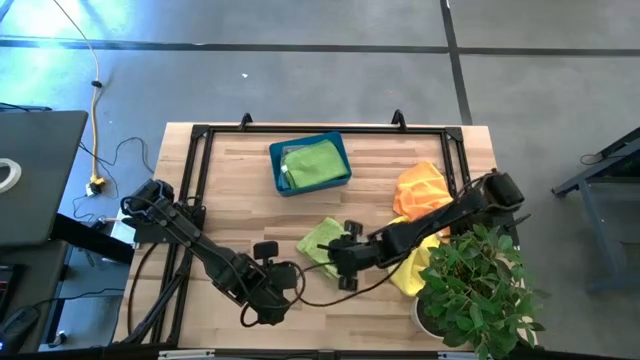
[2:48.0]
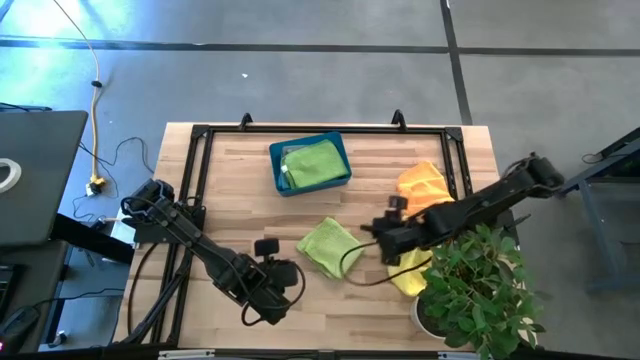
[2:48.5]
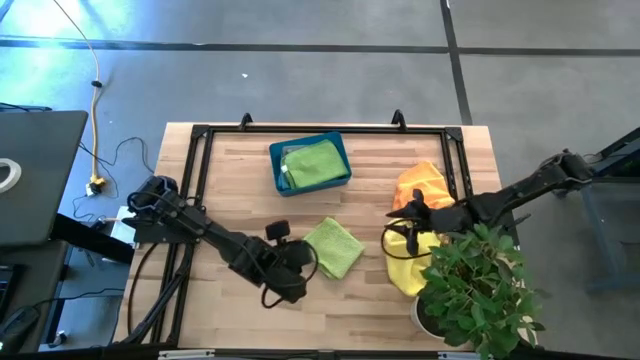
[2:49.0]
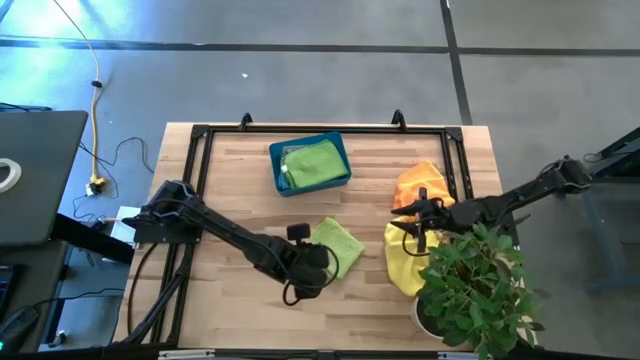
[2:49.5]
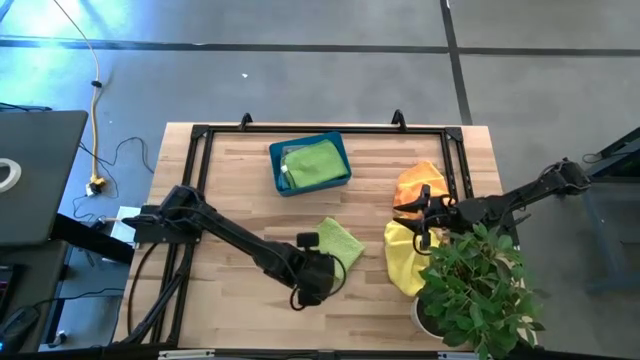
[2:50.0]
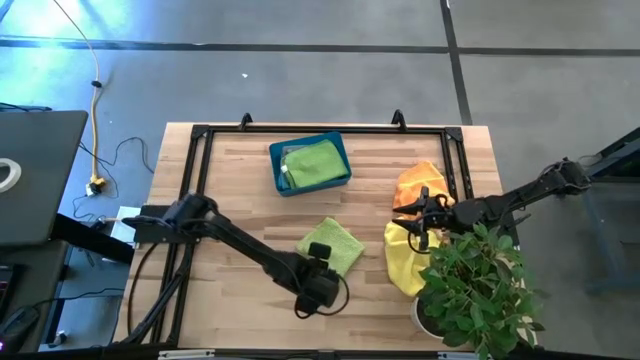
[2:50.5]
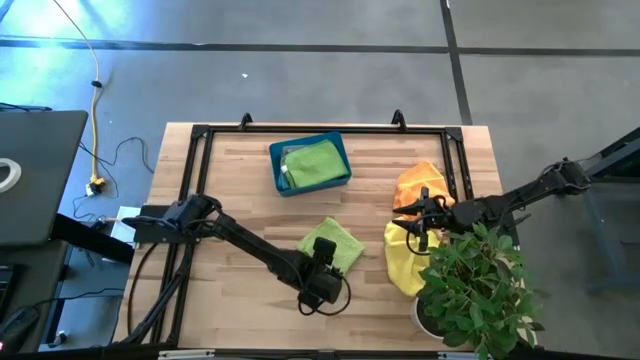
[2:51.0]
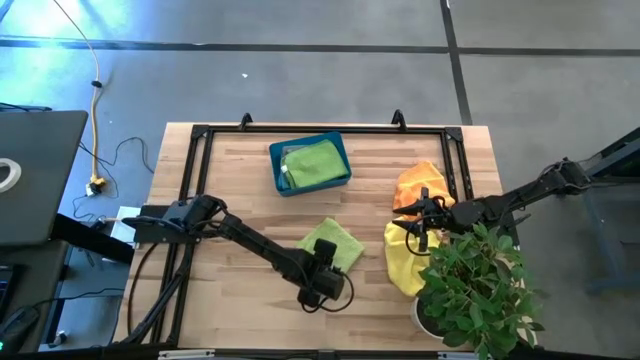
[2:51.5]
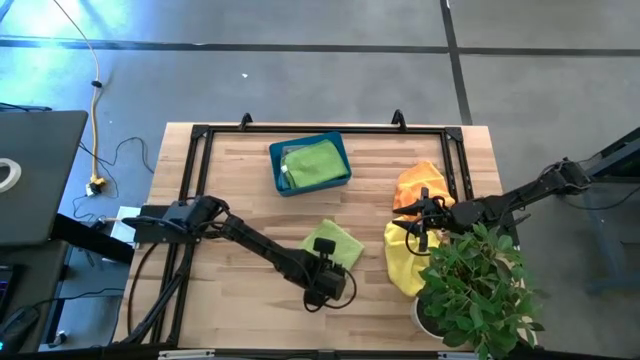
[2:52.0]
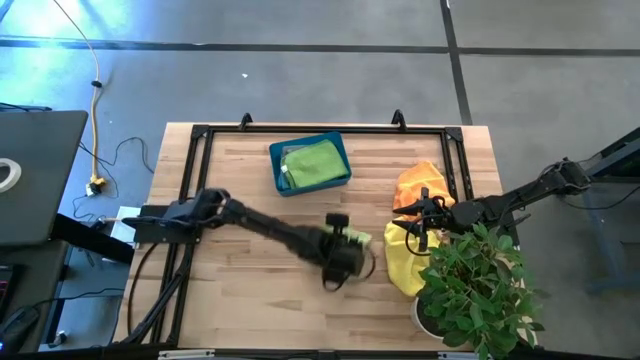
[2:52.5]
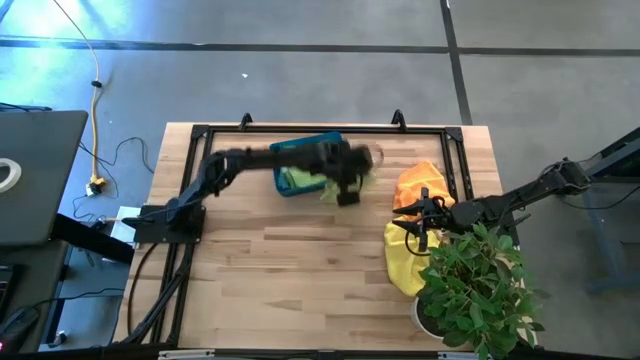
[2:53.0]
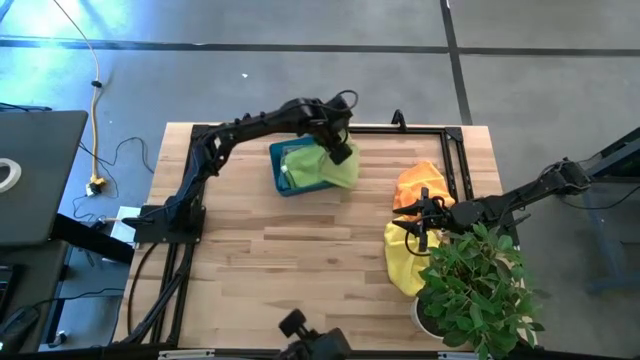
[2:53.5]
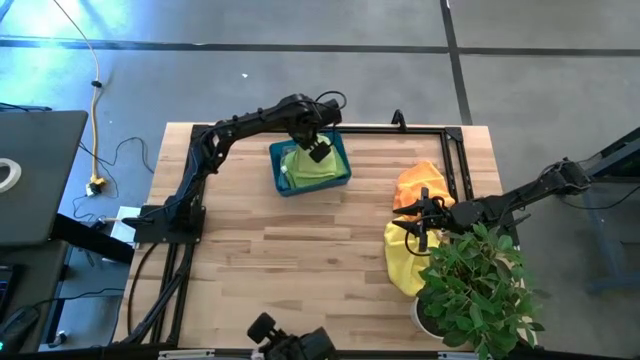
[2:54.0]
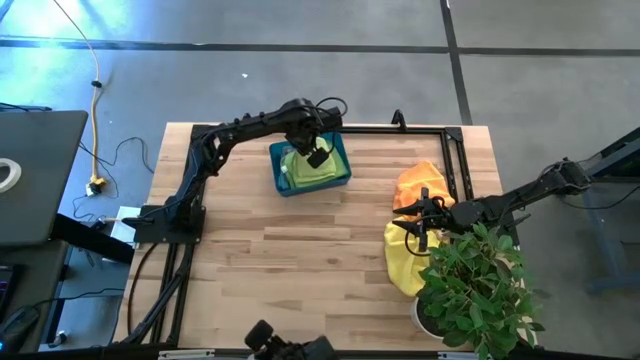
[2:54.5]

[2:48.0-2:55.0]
Task: Fold microfiber towels
Stack the green microfiber cloth on the green microfiber cloth in the blue bin

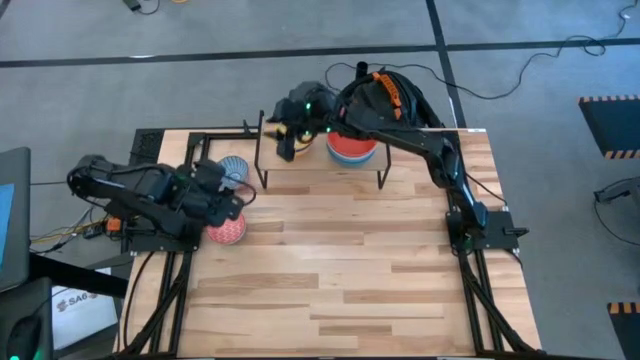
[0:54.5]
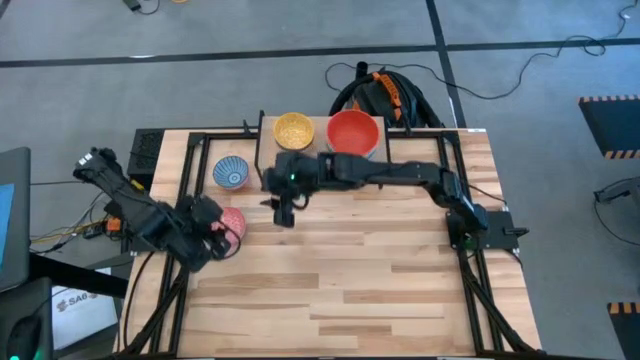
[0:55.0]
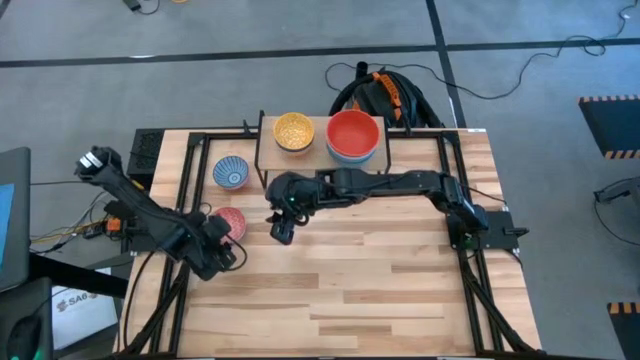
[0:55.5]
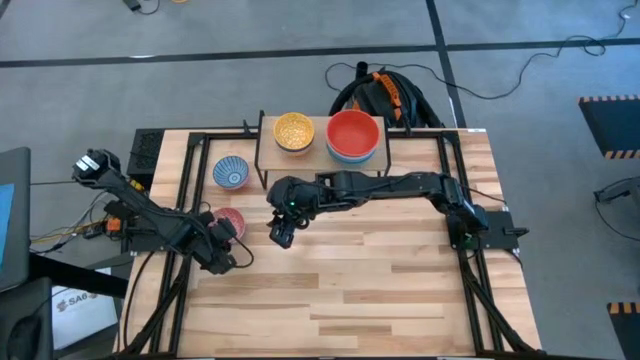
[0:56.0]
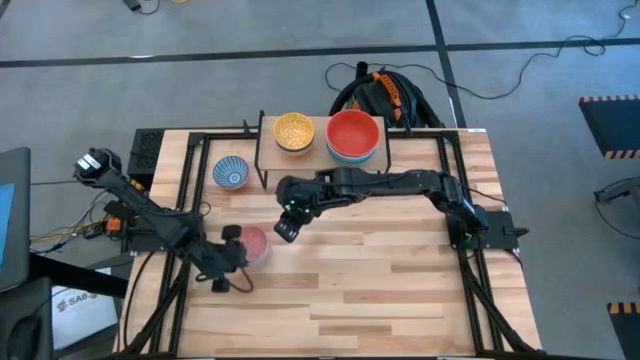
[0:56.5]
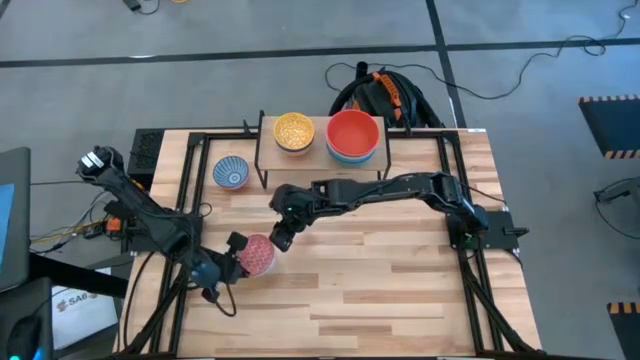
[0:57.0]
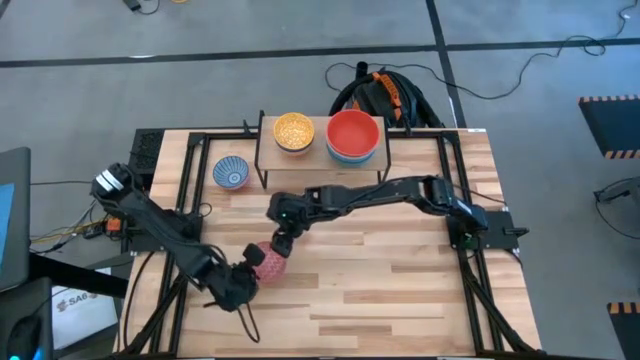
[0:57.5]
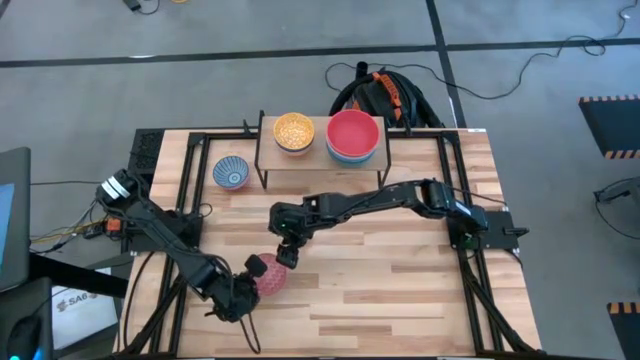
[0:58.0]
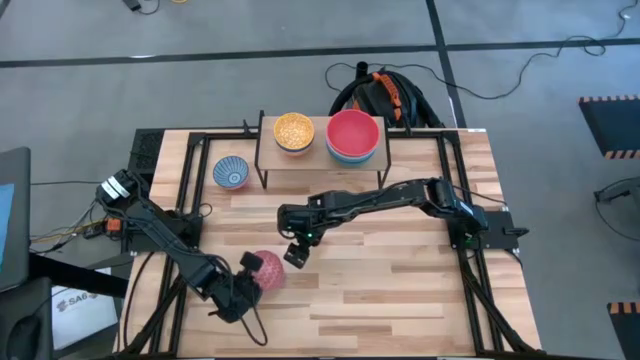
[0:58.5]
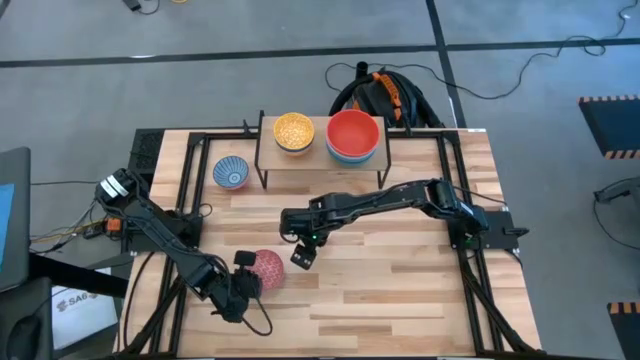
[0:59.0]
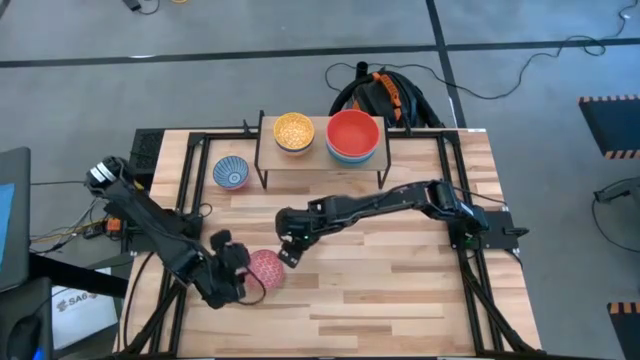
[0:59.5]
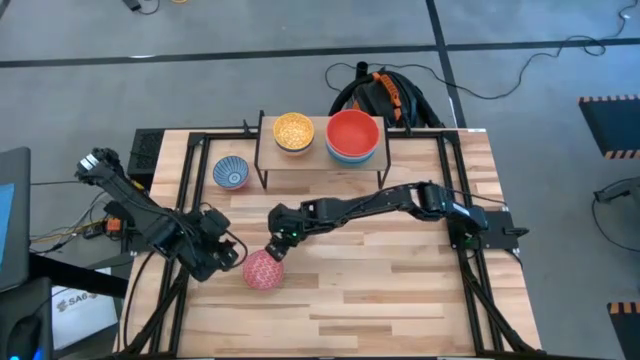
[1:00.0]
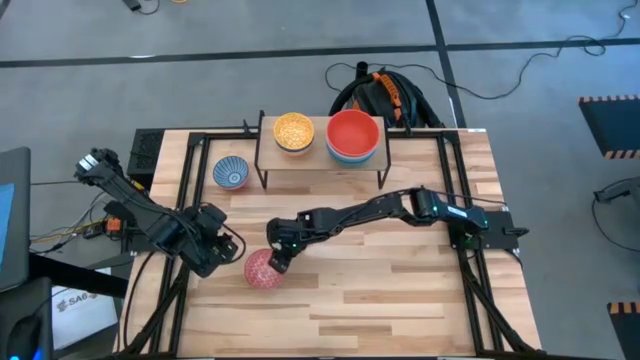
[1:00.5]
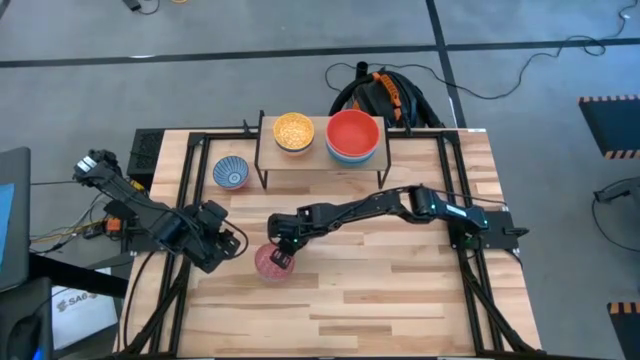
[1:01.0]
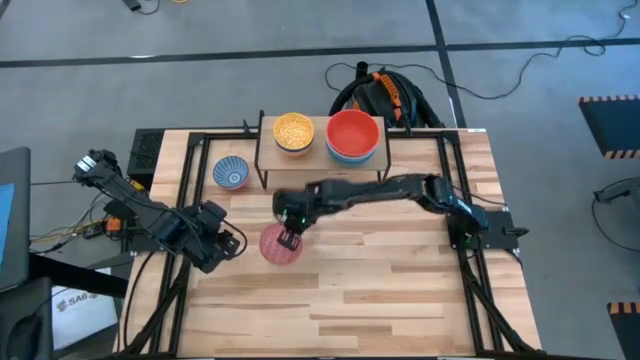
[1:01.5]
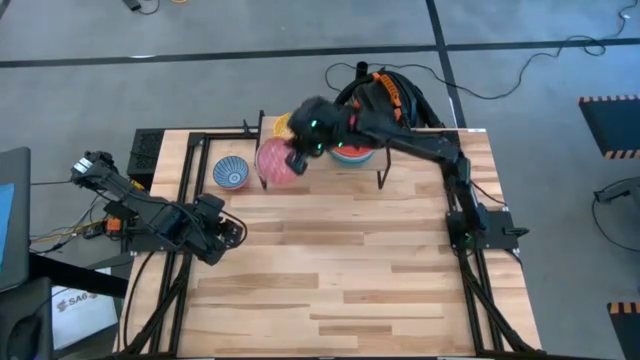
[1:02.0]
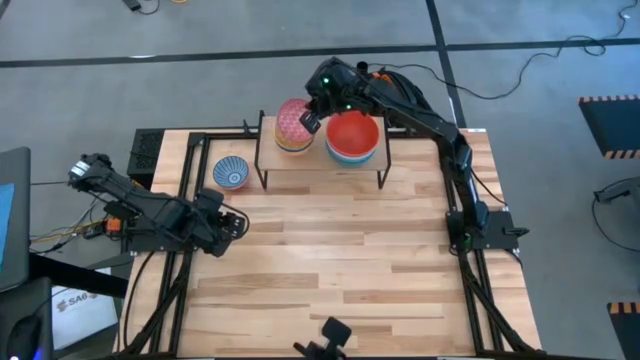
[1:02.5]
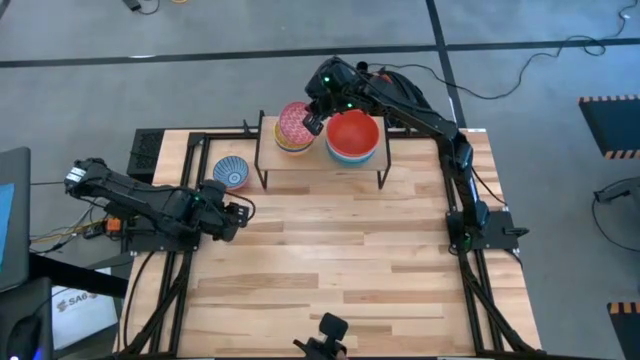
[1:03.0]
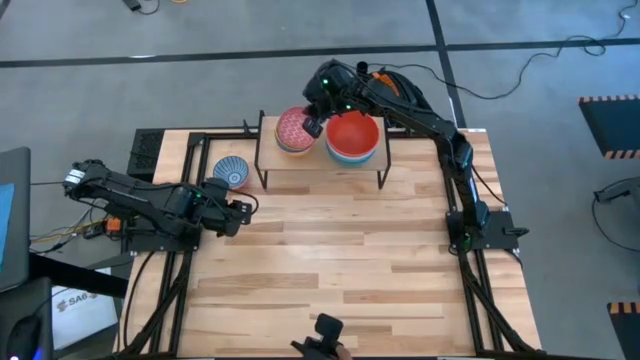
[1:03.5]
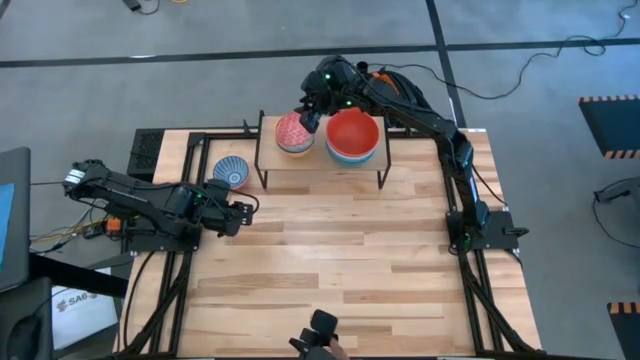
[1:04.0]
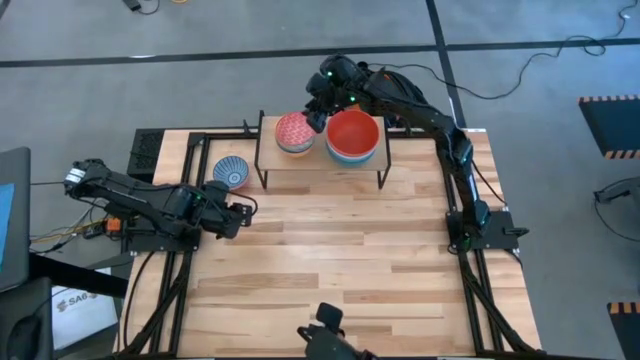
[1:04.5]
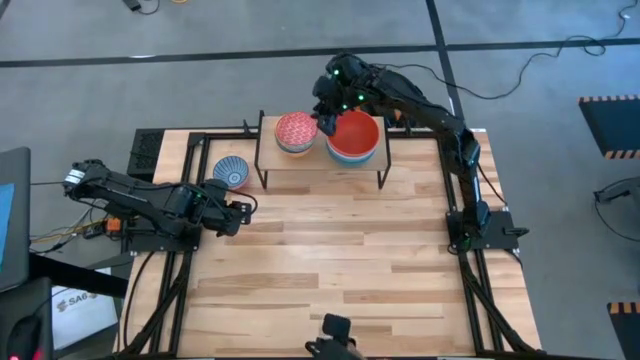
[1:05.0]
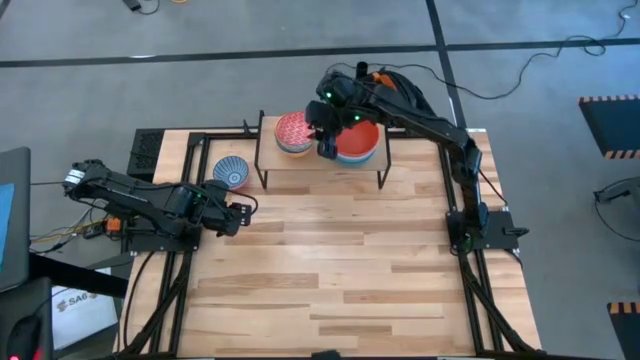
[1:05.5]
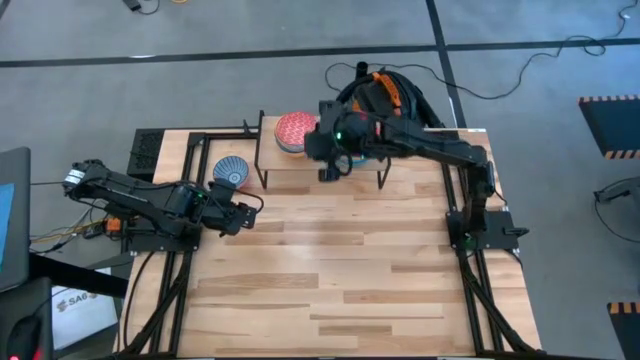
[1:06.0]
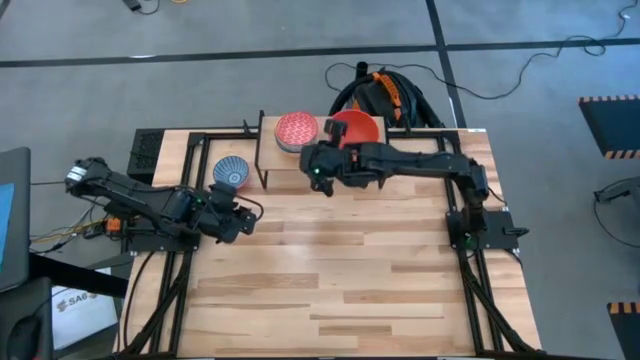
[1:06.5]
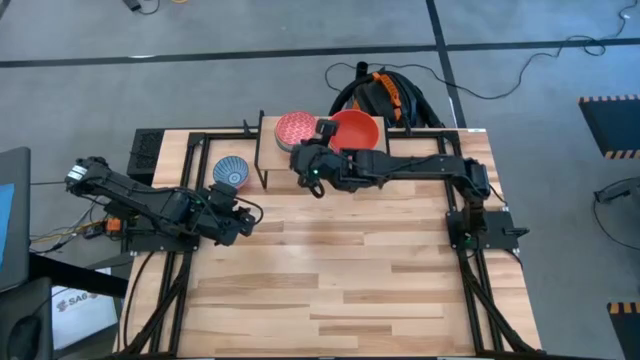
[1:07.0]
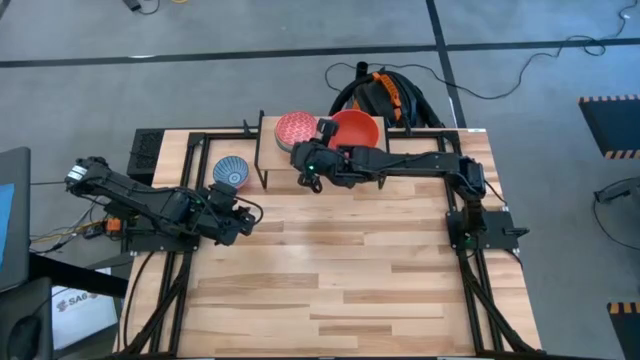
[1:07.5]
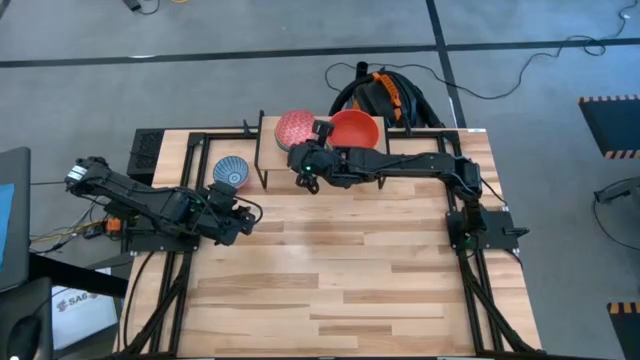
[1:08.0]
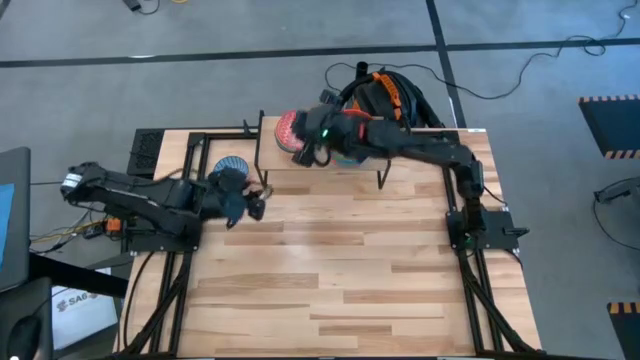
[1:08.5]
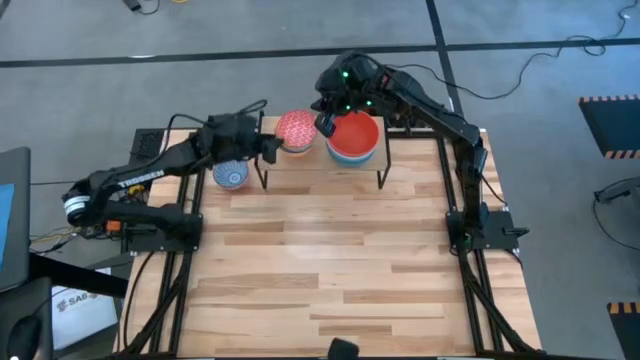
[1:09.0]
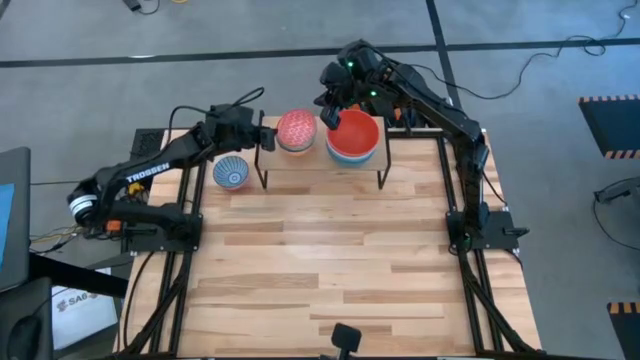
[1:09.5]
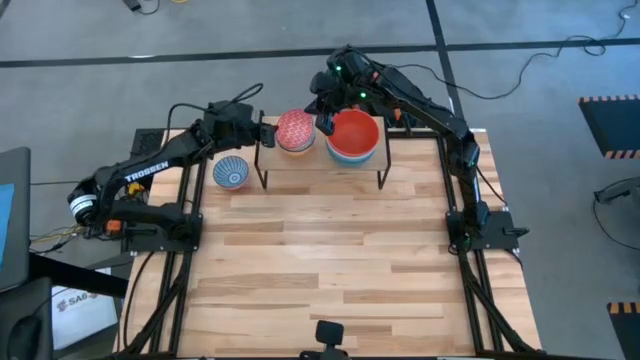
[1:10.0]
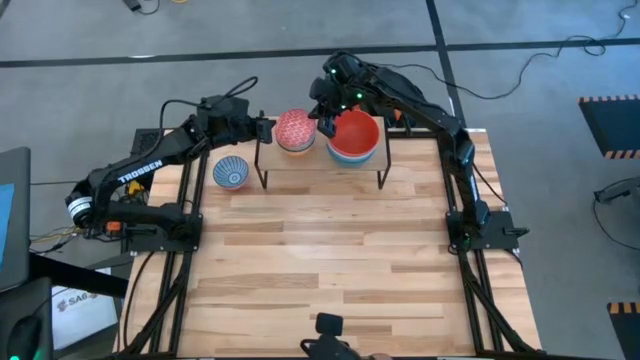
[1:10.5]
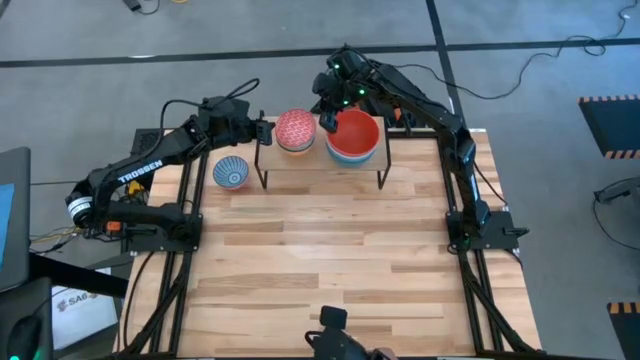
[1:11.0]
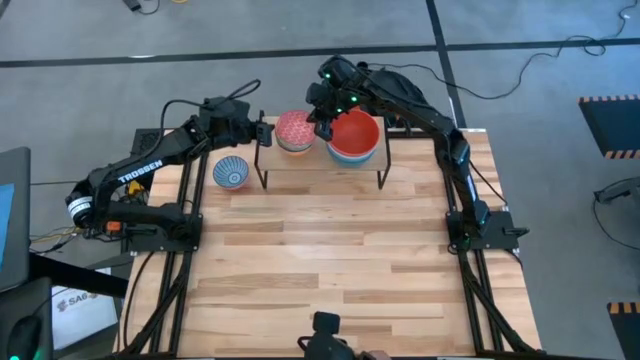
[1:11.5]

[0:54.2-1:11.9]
Task: Place and stack bowls onto a shelf
Stack the red patterned bowl on top of the yellow patterned bowl on the shelf
